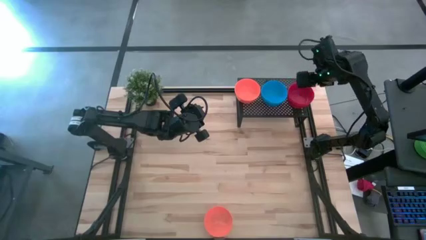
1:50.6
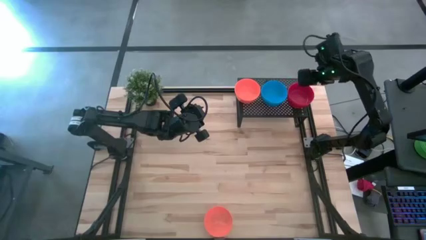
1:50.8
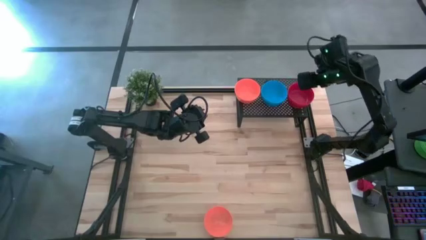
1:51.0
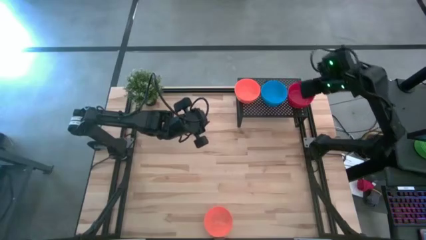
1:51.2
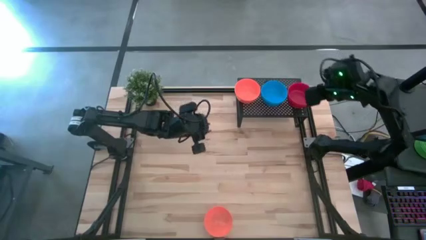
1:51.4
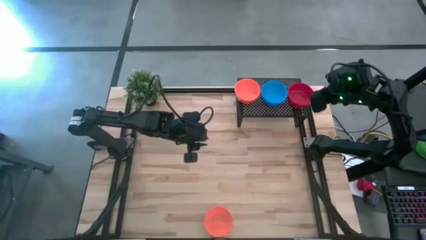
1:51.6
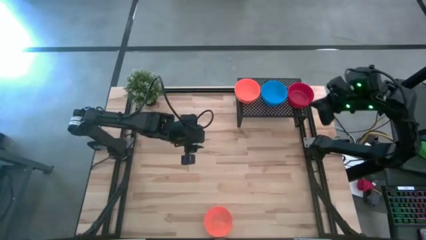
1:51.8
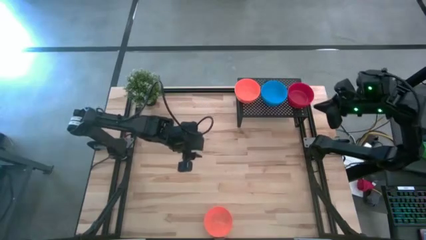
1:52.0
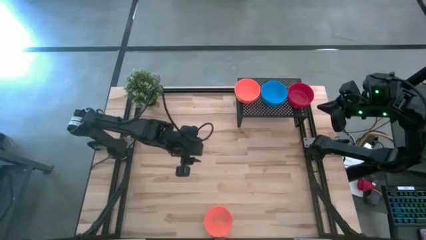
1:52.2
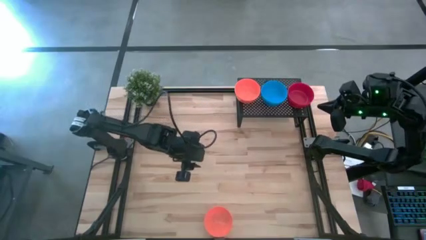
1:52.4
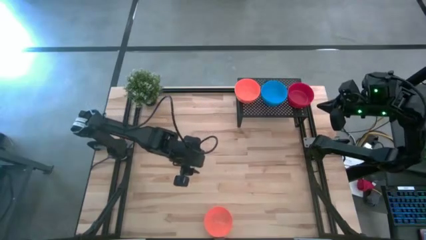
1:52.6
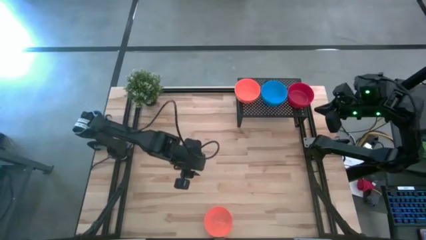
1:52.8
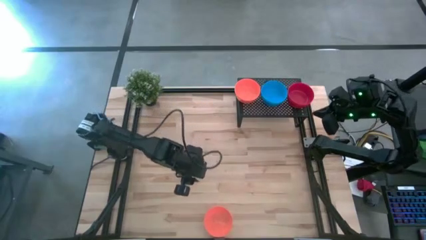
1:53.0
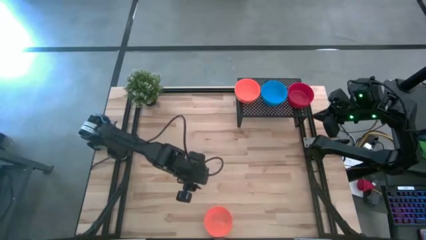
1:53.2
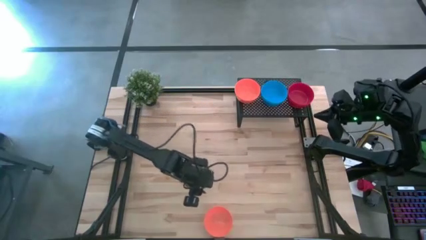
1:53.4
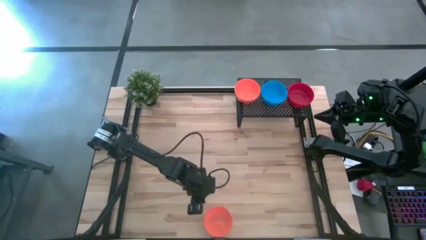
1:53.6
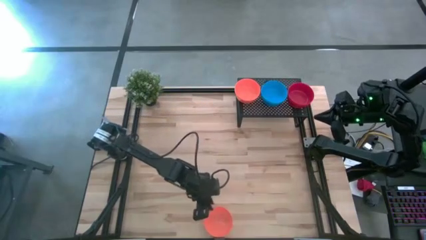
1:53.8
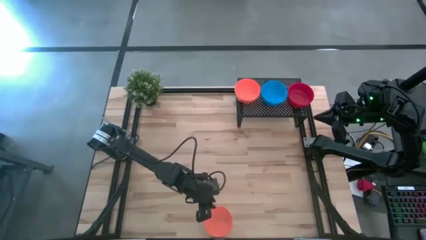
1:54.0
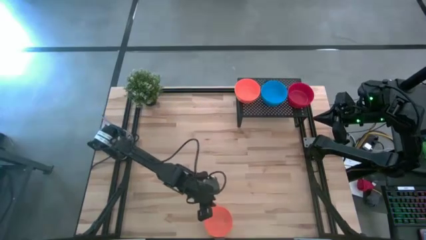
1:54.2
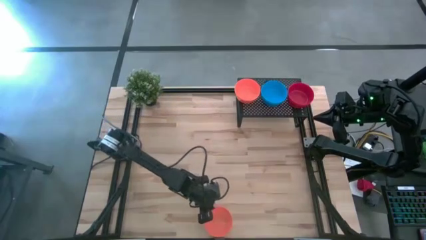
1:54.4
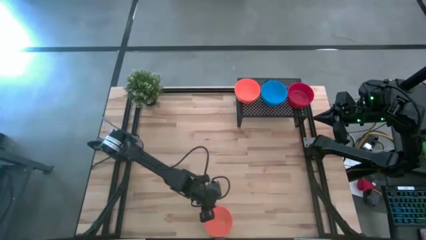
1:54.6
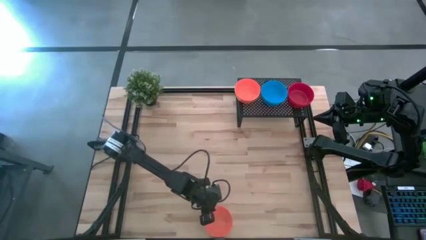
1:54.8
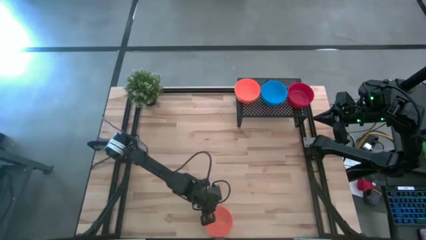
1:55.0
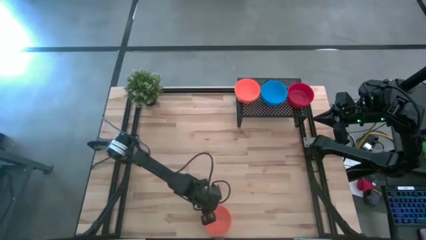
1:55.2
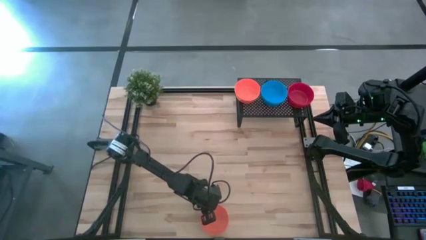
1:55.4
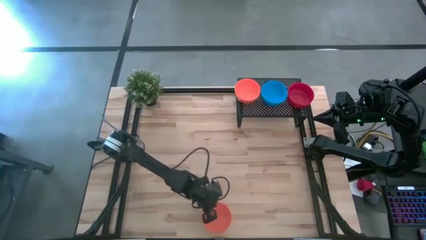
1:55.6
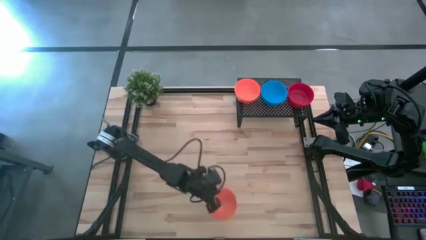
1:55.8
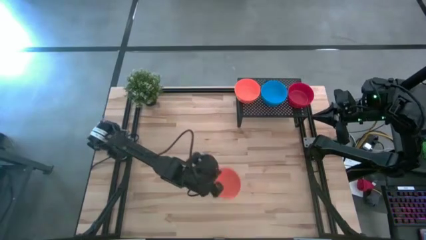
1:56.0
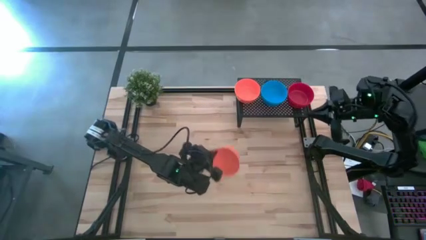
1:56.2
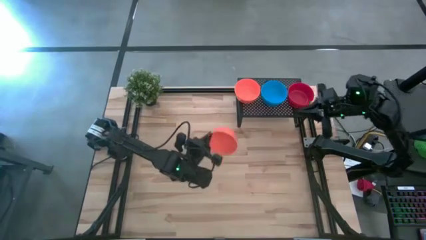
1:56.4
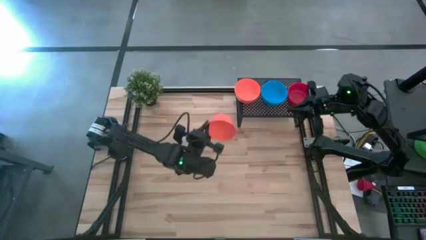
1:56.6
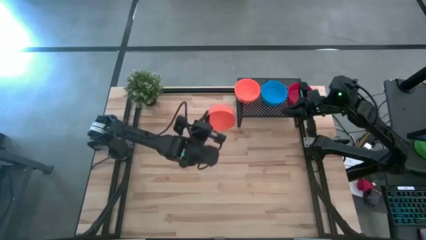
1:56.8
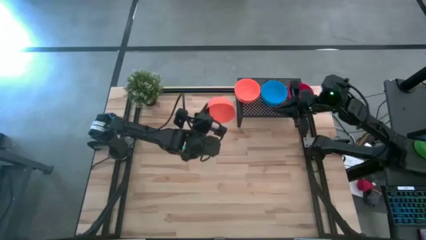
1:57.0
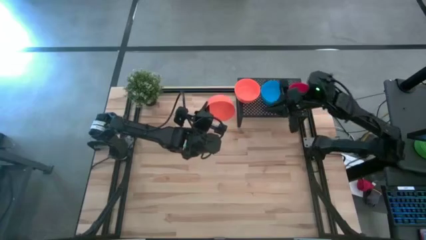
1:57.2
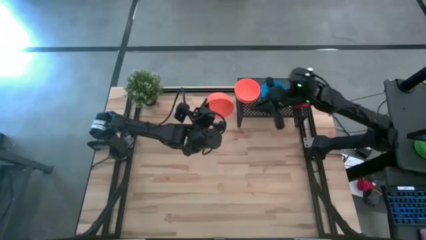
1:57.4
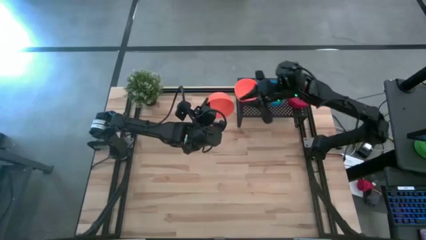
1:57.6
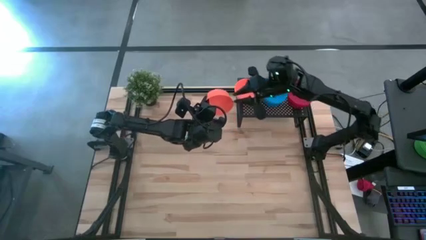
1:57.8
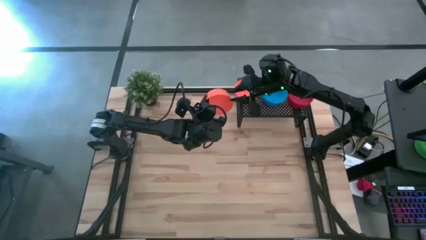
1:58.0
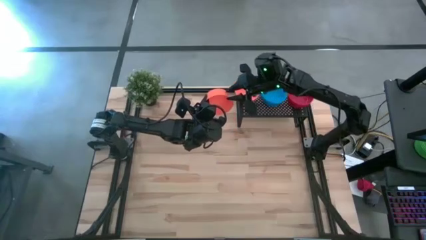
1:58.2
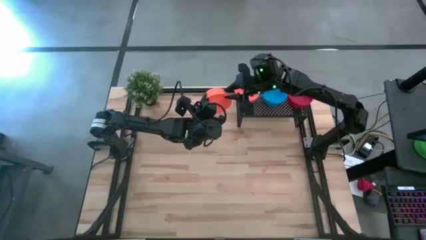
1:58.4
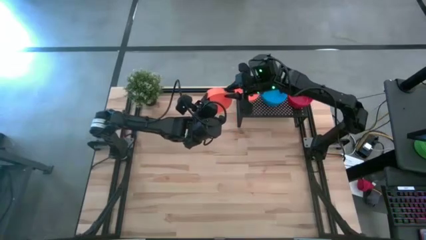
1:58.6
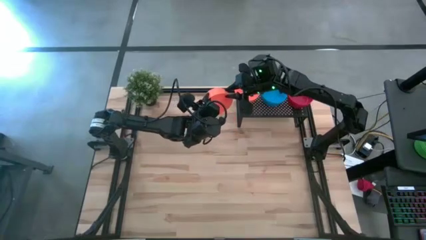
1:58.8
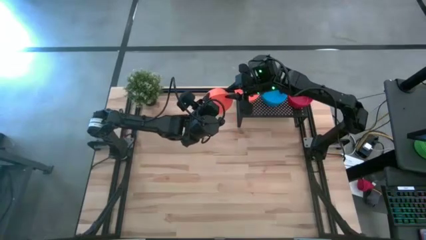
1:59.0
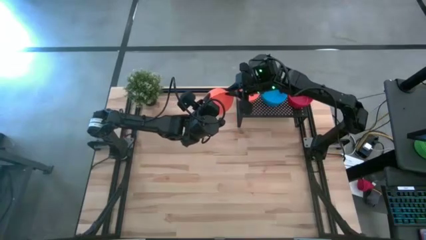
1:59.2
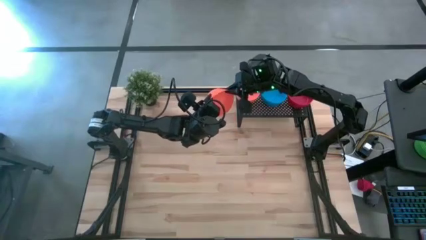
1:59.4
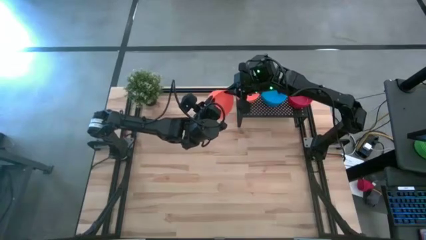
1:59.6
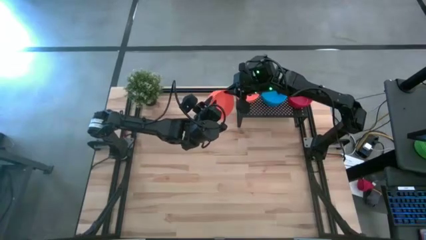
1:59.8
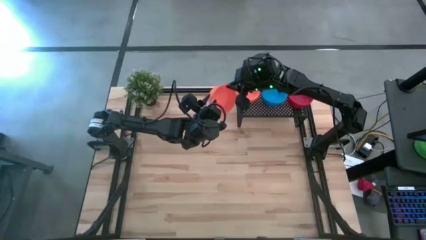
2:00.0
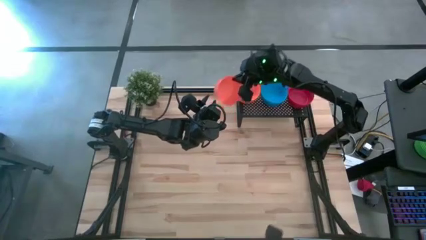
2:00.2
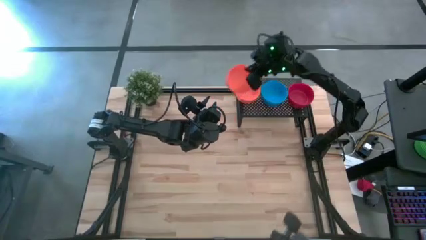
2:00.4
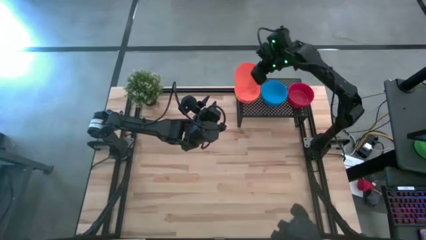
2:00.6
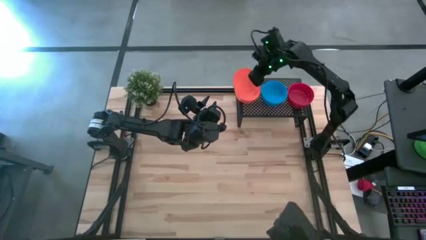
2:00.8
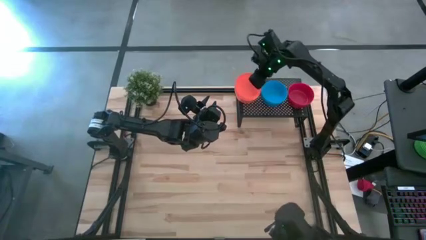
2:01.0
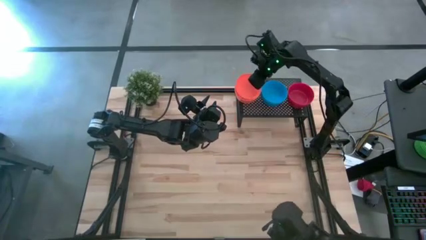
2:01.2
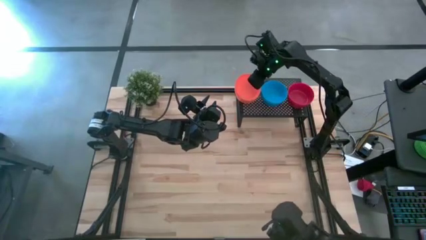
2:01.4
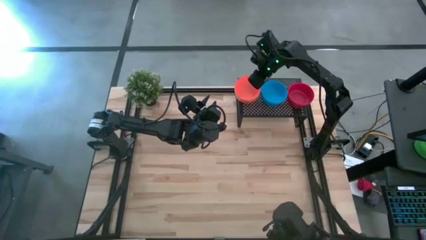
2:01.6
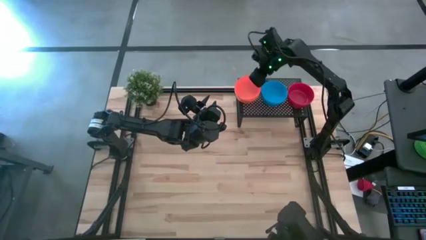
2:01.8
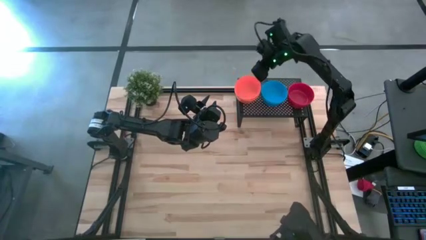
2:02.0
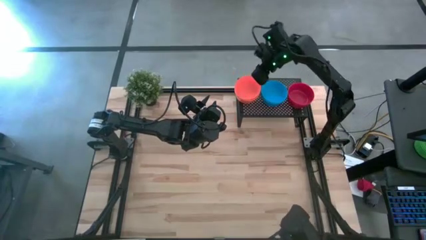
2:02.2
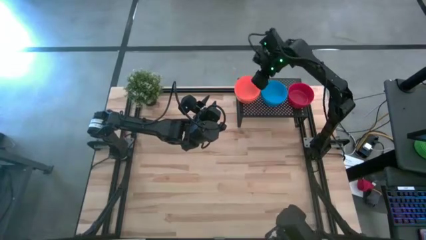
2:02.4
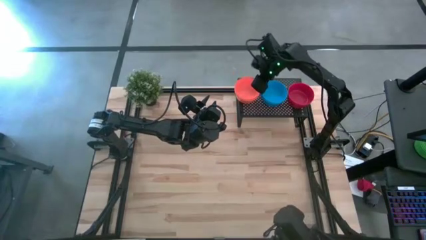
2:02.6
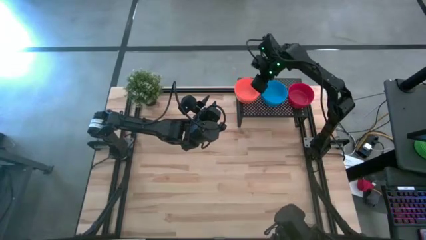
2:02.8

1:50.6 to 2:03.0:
Task: Pick & Place Mini bowls
Stack the orange bowl on top of the stacked orange bowl on the shelf
